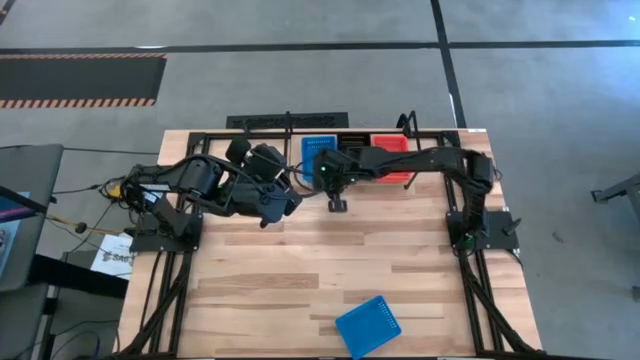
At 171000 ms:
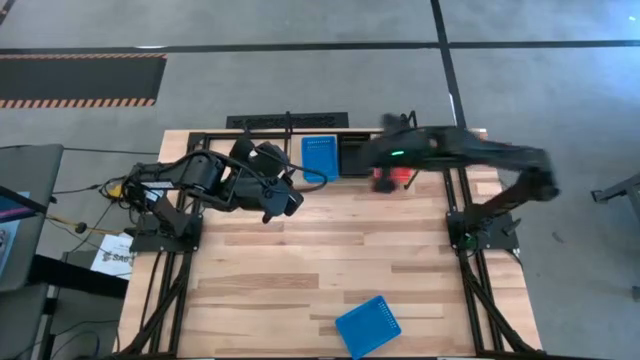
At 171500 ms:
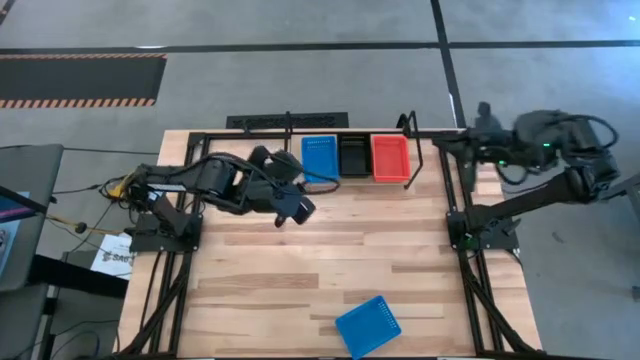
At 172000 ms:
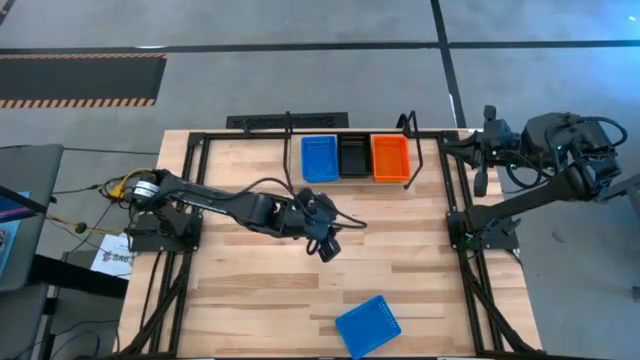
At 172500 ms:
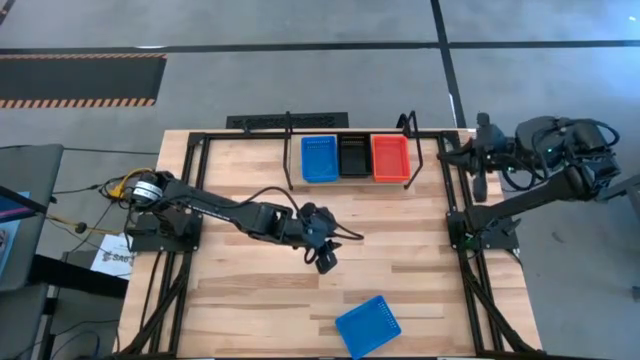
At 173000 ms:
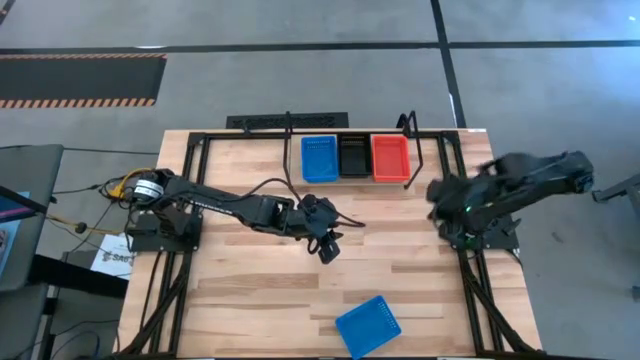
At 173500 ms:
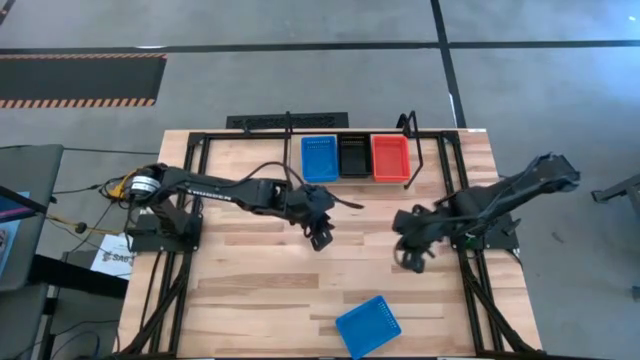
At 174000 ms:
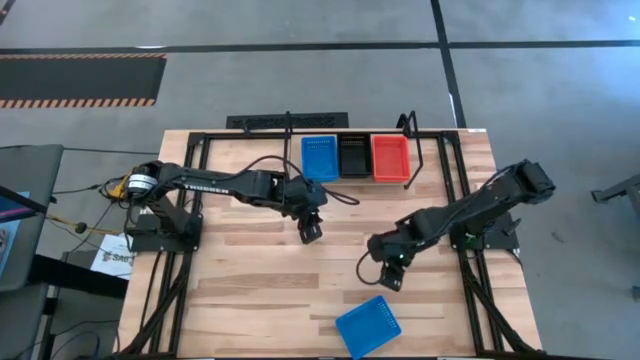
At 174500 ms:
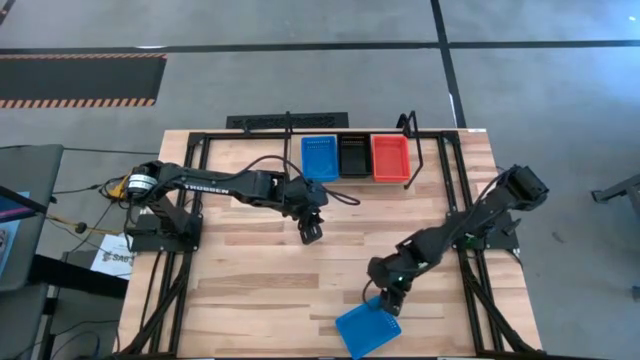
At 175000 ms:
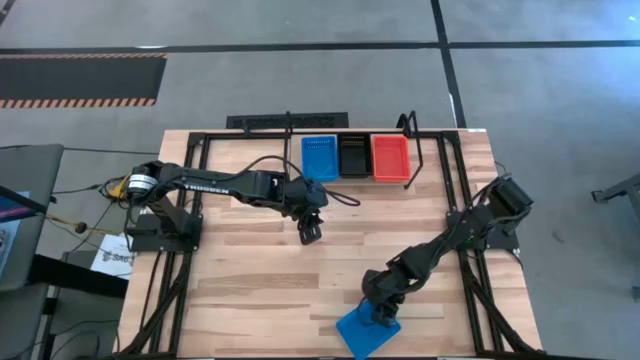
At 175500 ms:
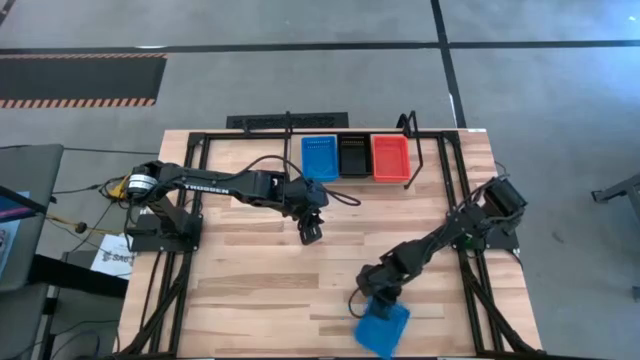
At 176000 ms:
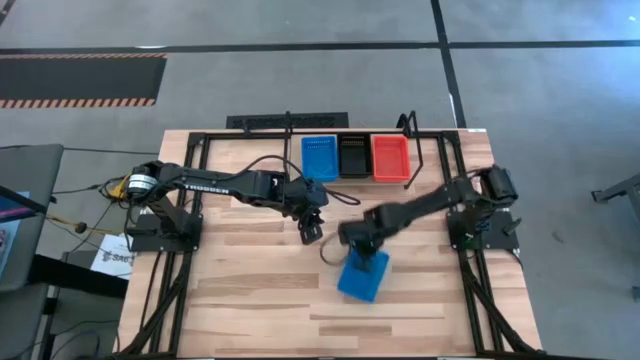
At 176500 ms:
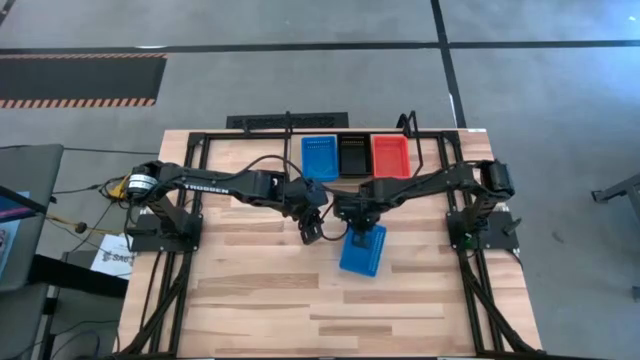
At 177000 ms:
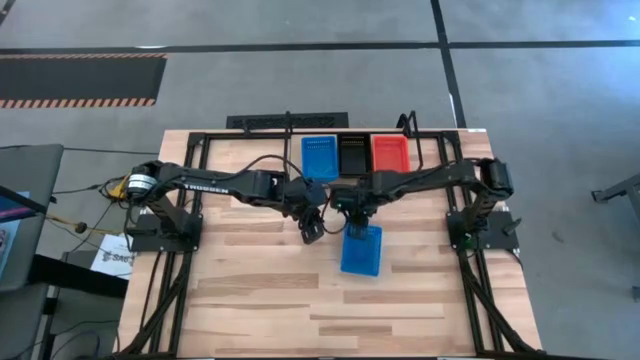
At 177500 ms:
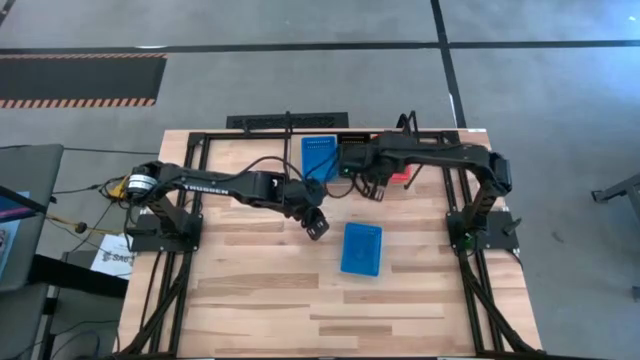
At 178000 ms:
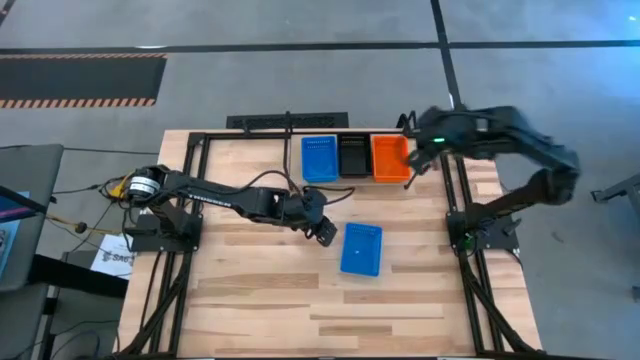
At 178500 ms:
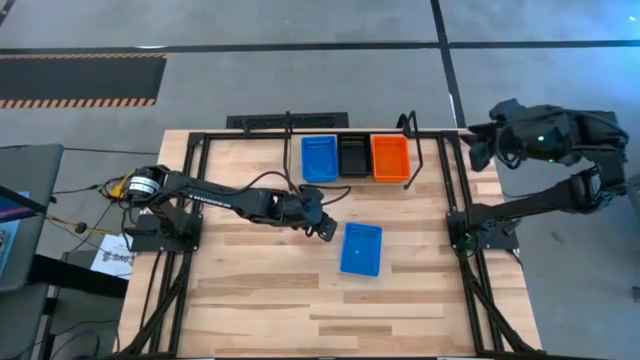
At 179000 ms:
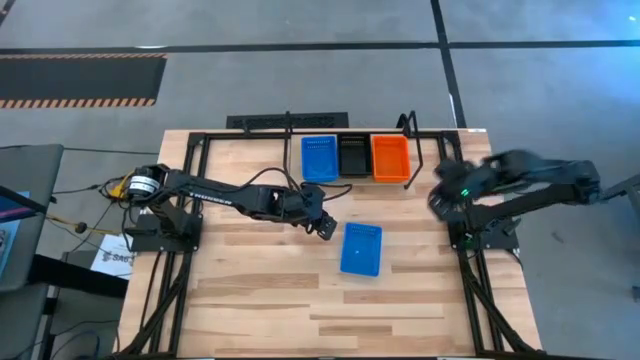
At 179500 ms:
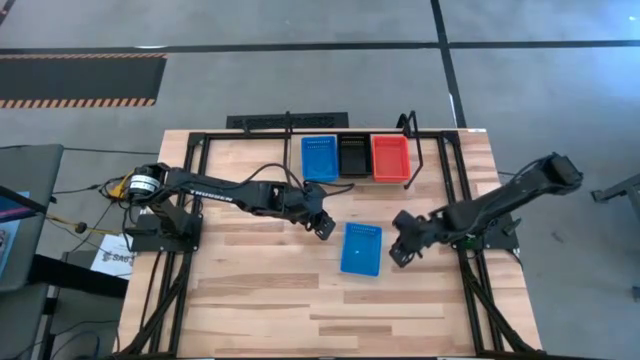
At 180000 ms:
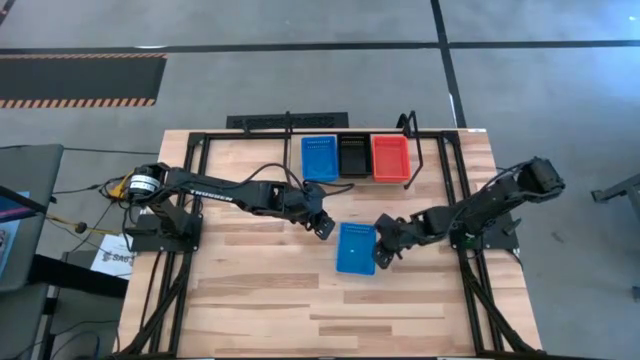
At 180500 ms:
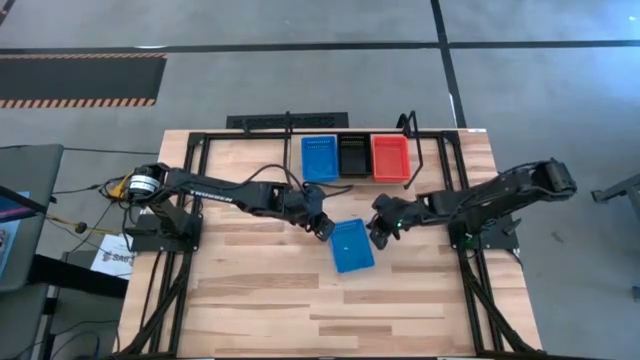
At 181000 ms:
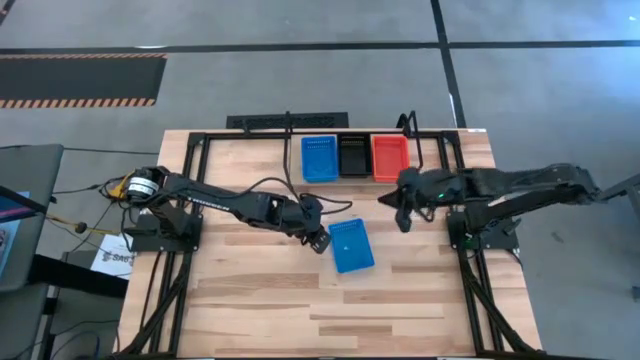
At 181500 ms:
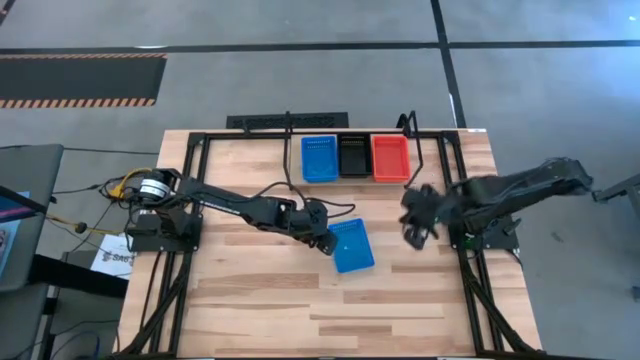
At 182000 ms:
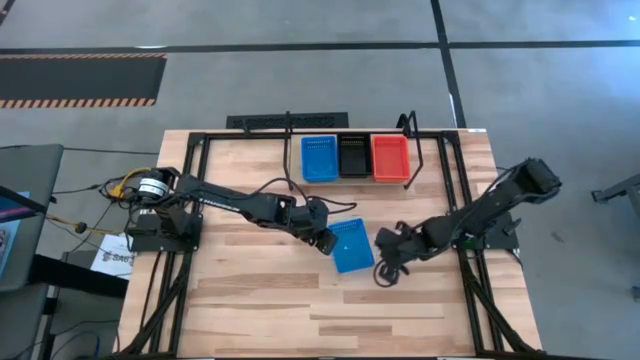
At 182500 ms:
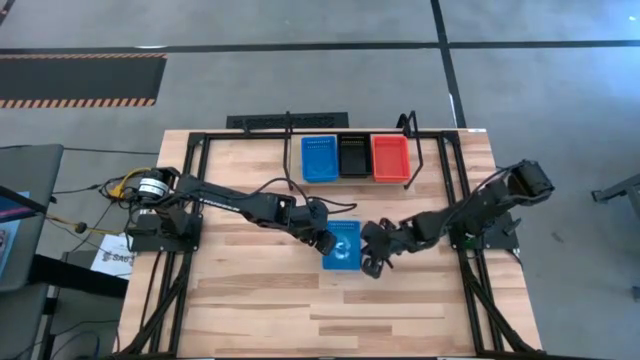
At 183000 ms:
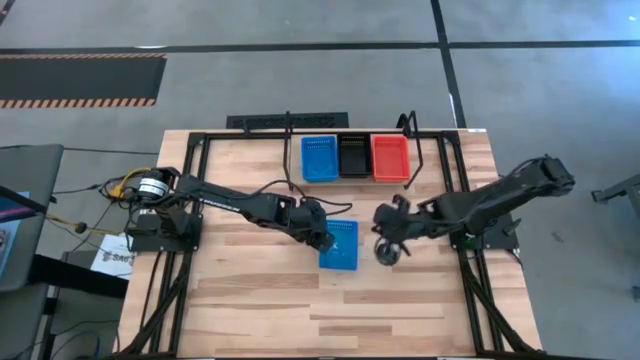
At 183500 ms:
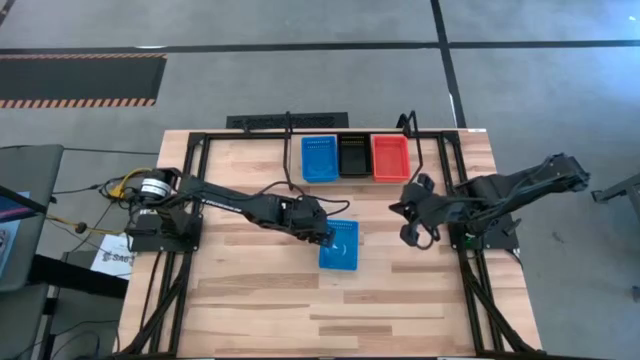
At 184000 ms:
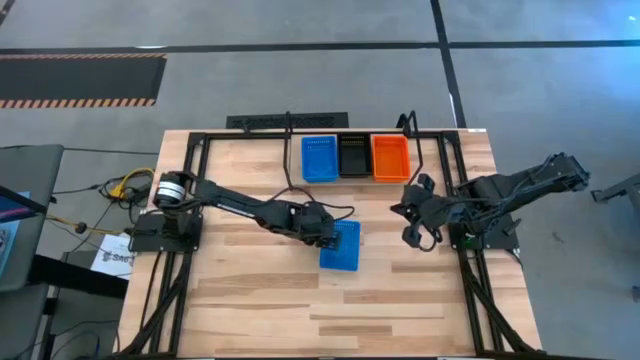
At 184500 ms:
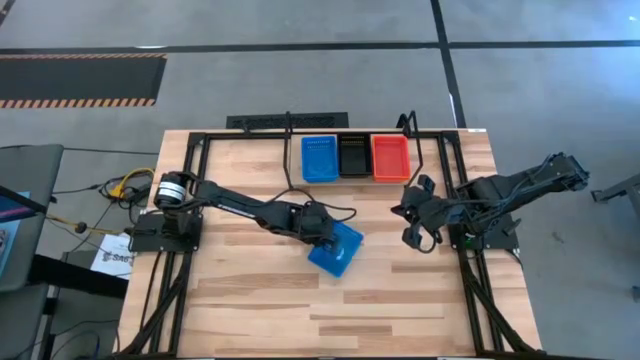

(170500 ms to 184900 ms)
Task: Stack baskets on shelf by color
Stack the blue bin on top of the blue bin on the shelf

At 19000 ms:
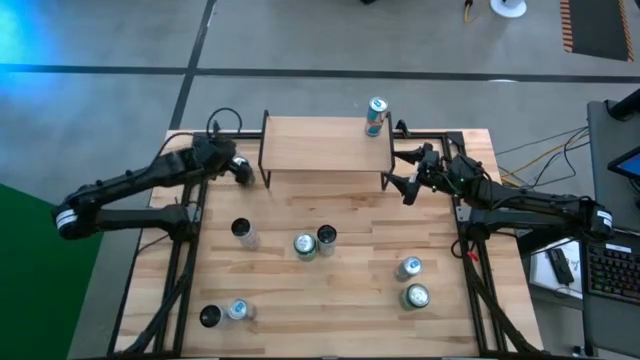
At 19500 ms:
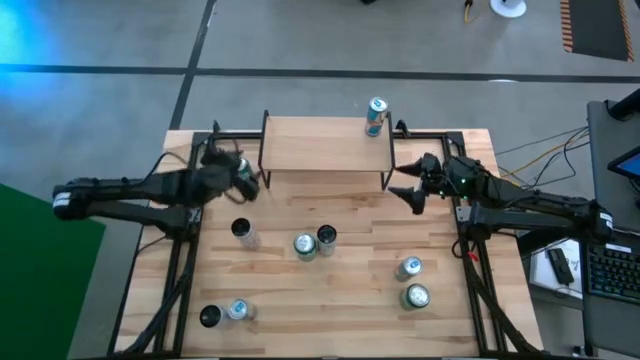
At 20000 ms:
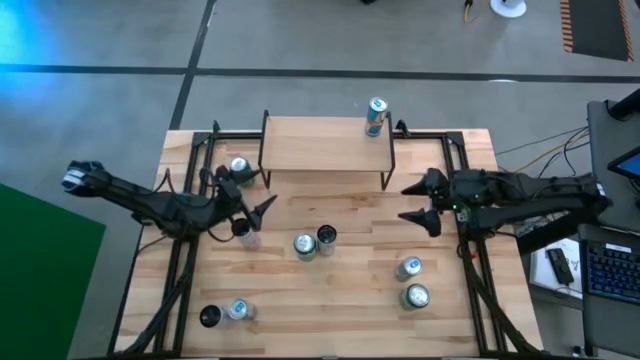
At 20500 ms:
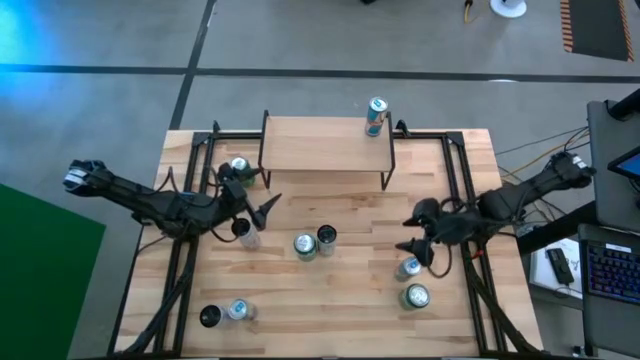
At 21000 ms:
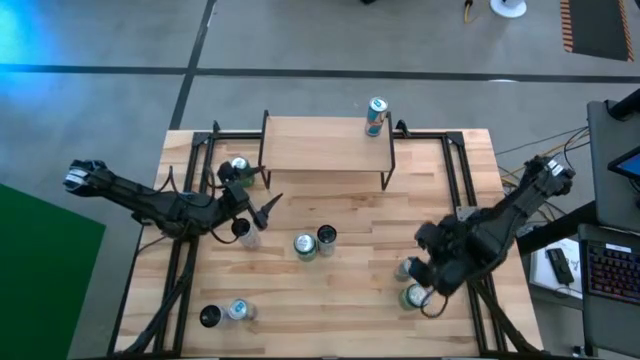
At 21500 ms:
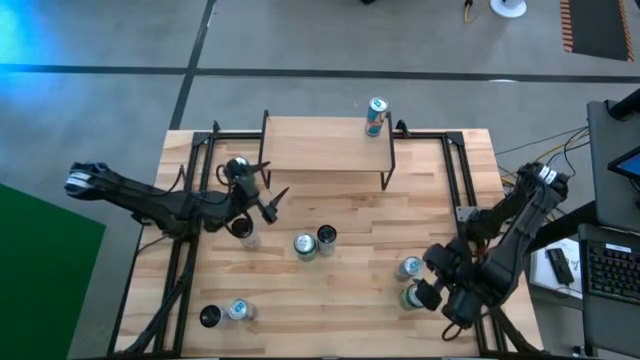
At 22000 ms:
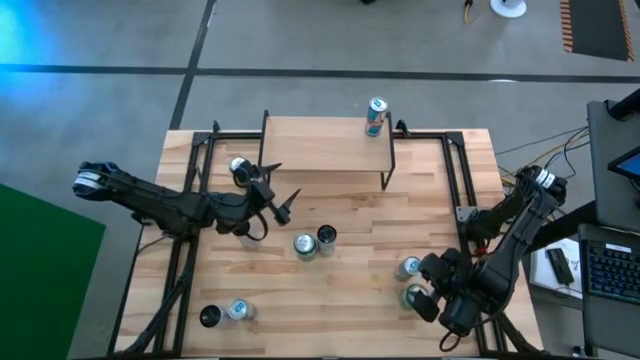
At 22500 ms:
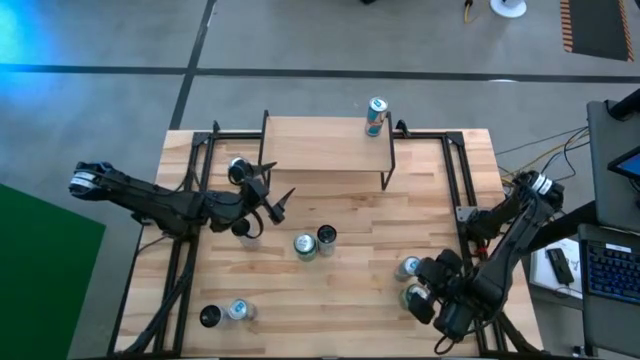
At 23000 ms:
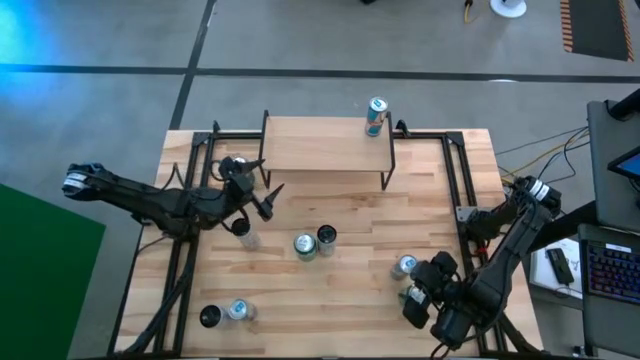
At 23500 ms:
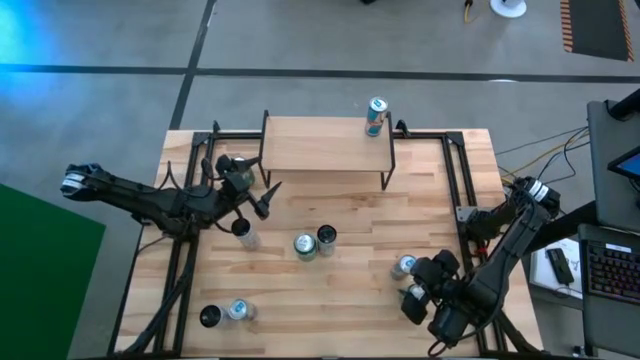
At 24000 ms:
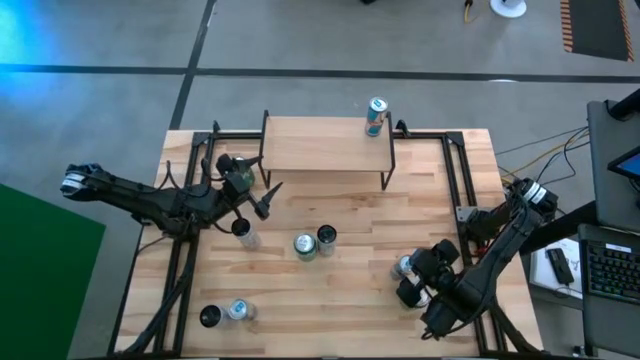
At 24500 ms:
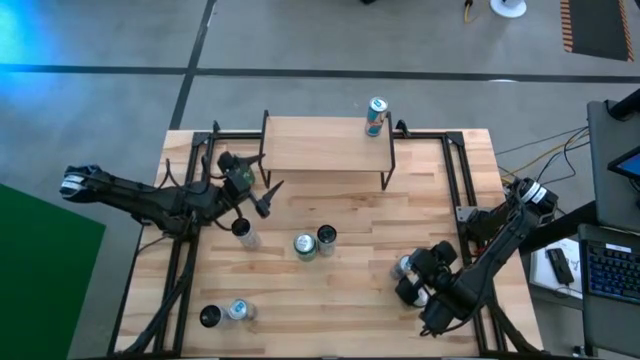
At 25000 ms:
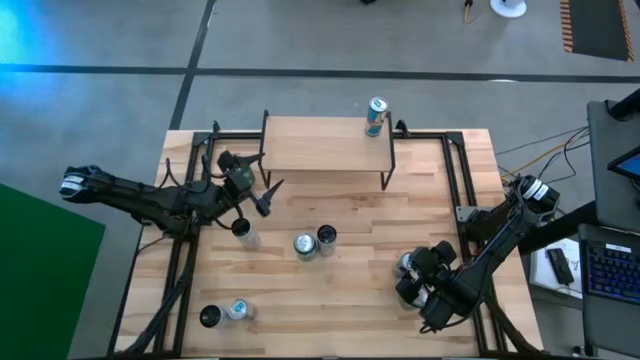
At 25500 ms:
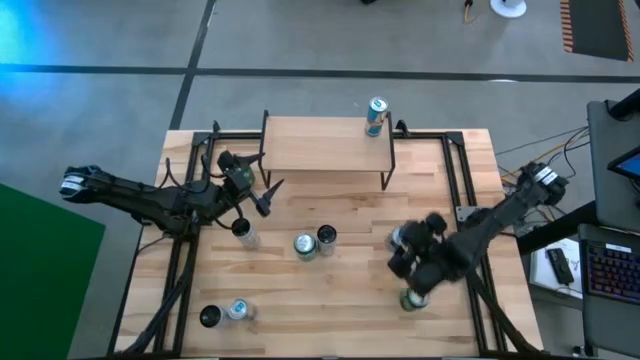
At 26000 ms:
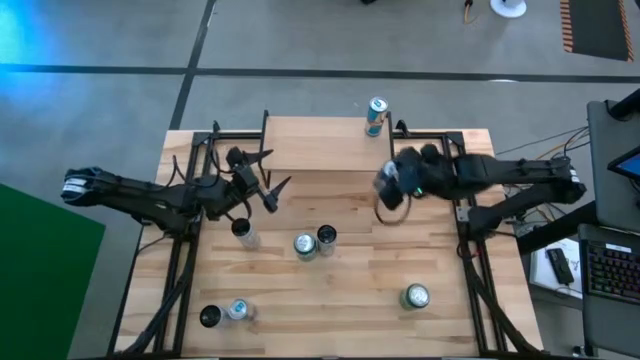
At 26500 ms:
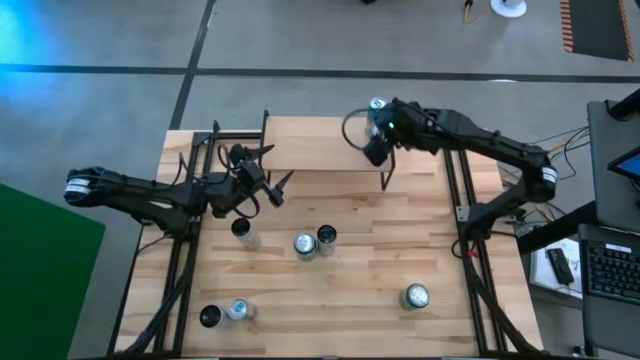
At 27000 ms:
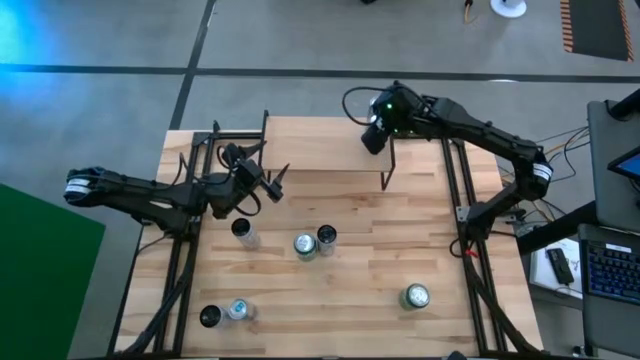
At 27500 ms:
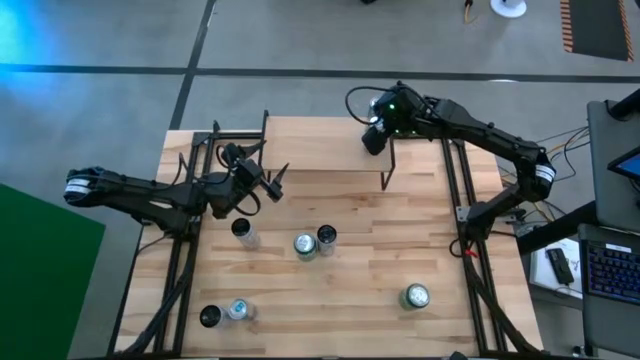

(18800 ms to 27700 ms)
Task: Sort soda cans
Put the right blue soda can on the shelf and align it with other blue soda can
